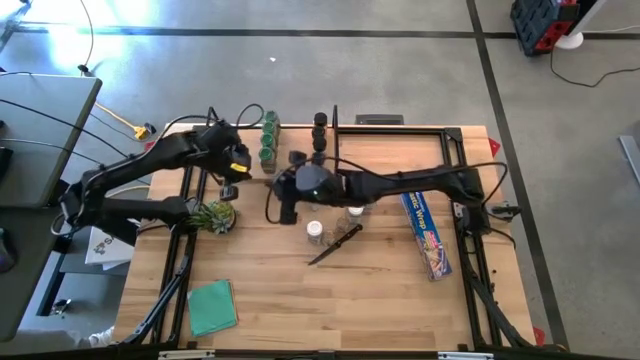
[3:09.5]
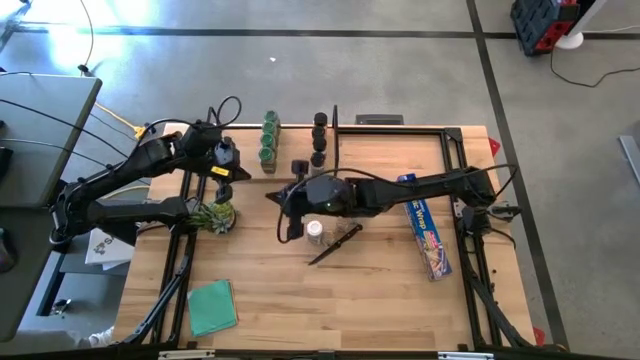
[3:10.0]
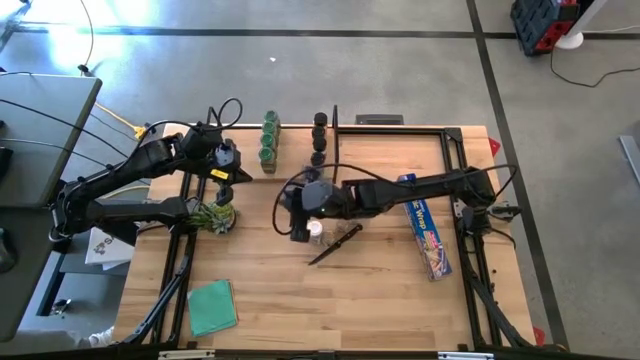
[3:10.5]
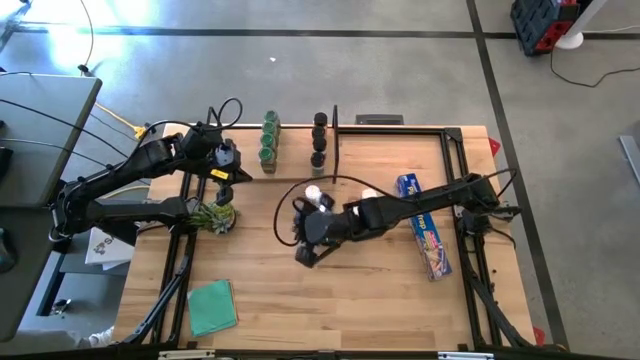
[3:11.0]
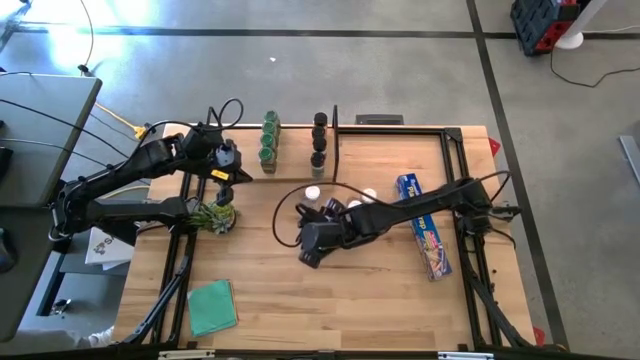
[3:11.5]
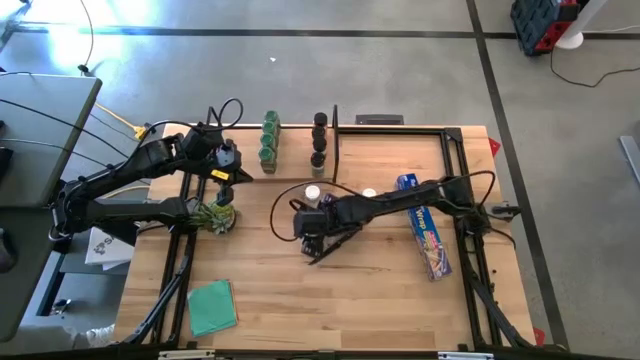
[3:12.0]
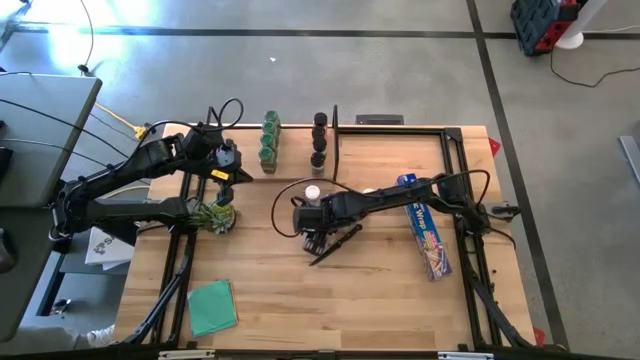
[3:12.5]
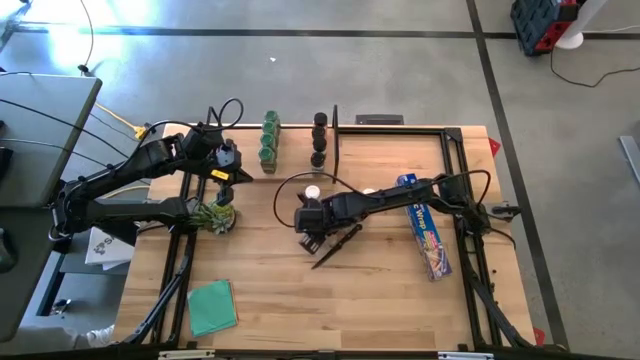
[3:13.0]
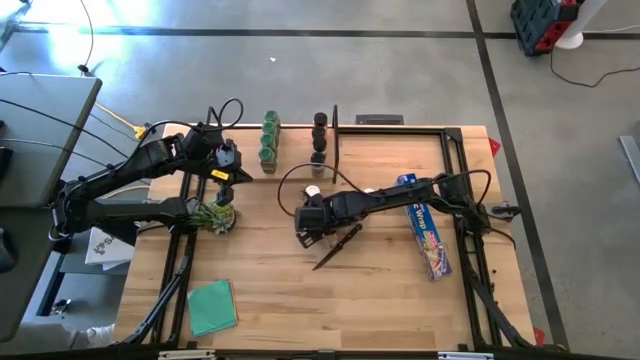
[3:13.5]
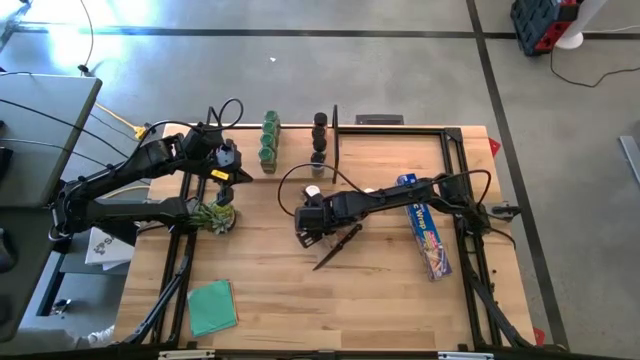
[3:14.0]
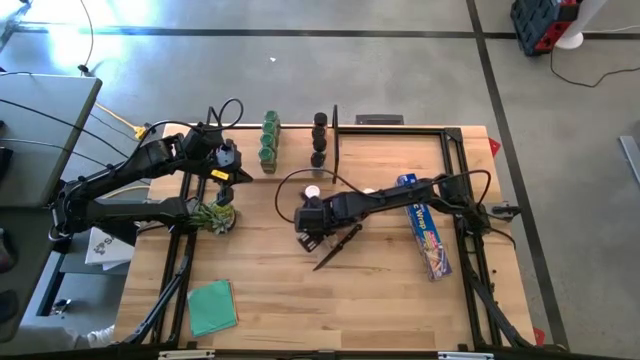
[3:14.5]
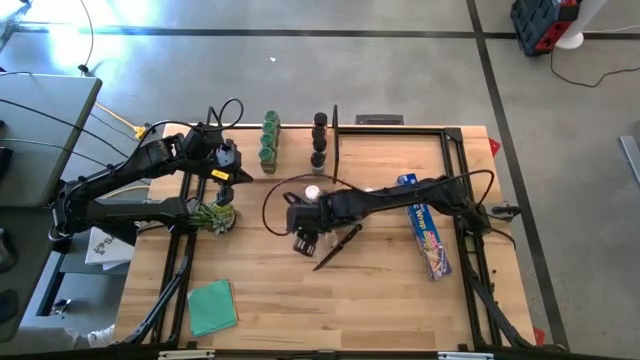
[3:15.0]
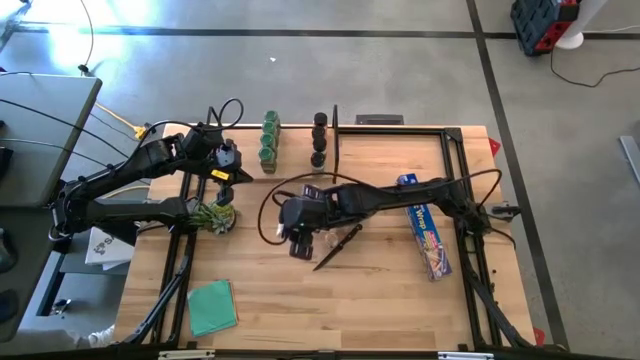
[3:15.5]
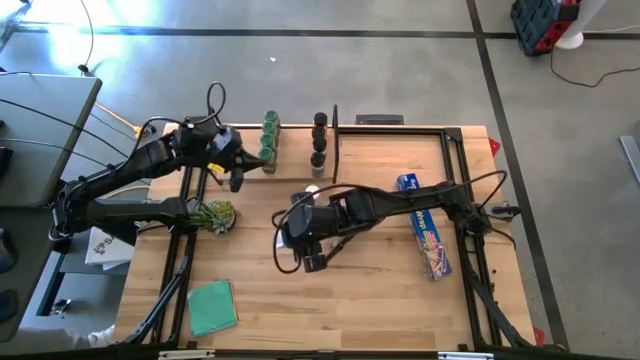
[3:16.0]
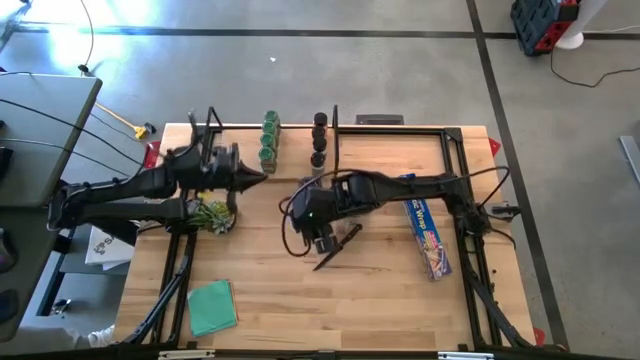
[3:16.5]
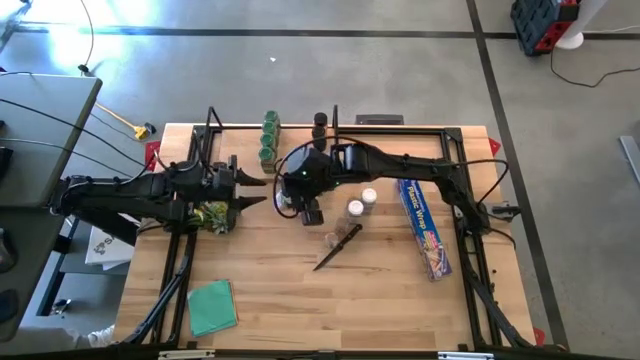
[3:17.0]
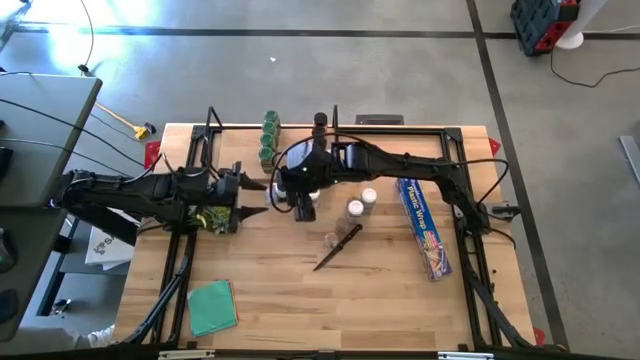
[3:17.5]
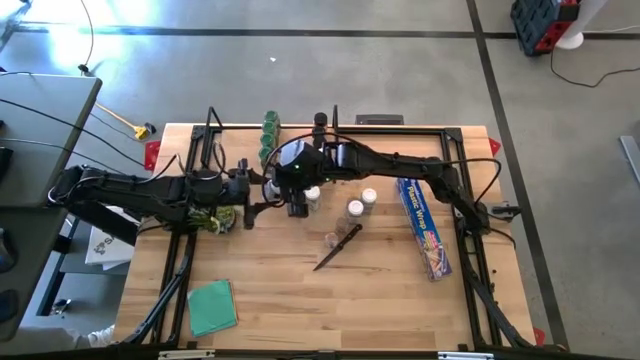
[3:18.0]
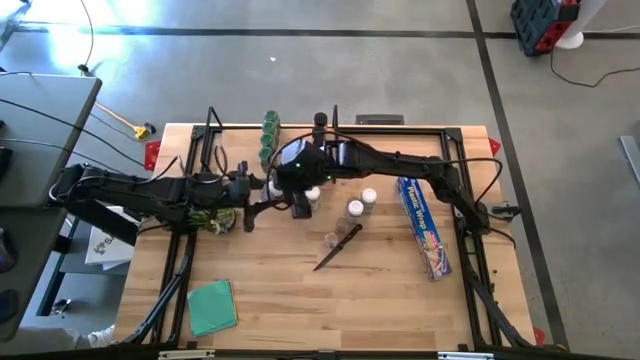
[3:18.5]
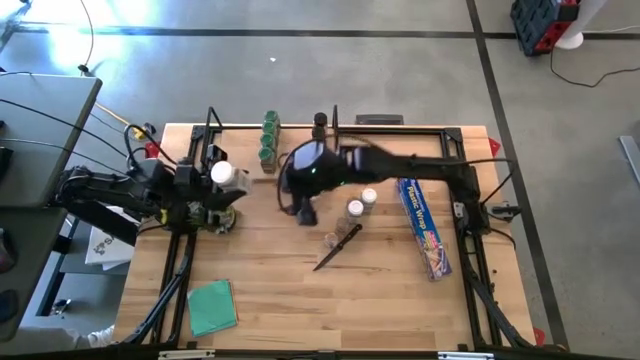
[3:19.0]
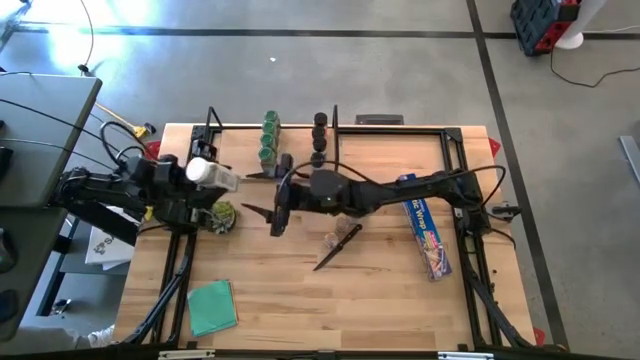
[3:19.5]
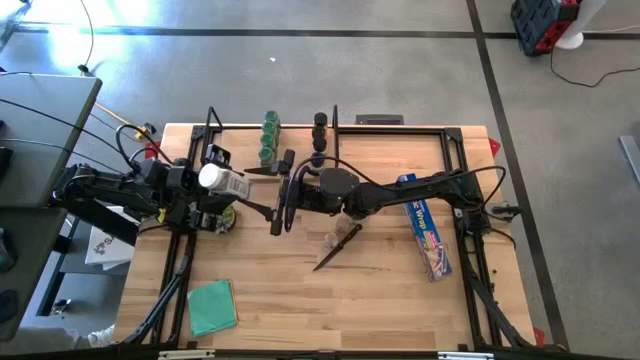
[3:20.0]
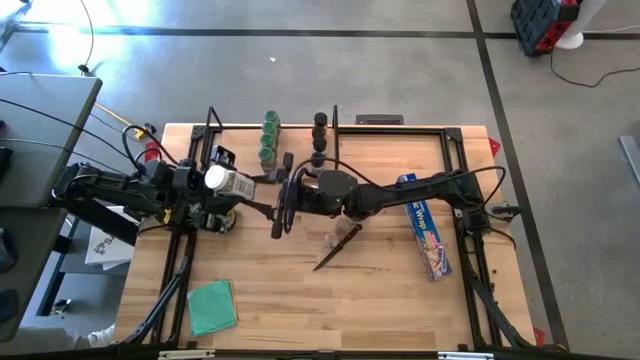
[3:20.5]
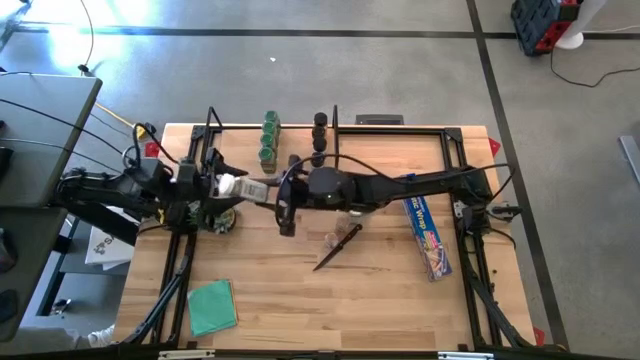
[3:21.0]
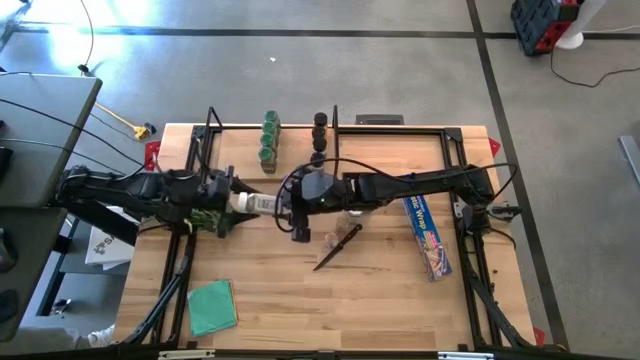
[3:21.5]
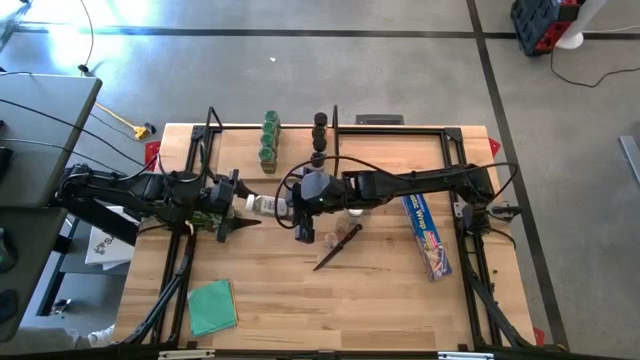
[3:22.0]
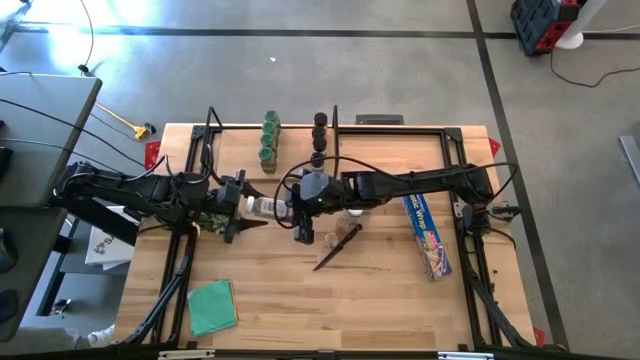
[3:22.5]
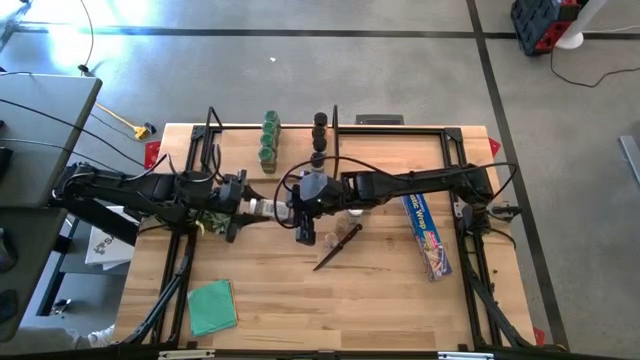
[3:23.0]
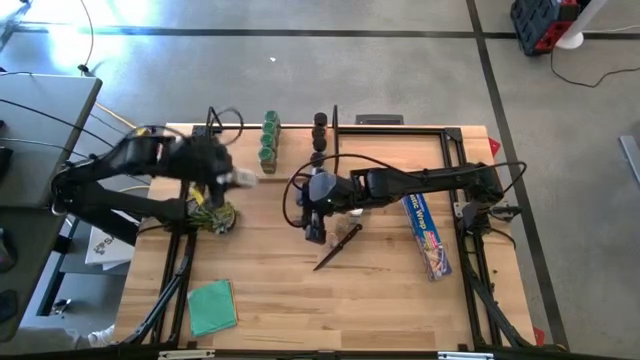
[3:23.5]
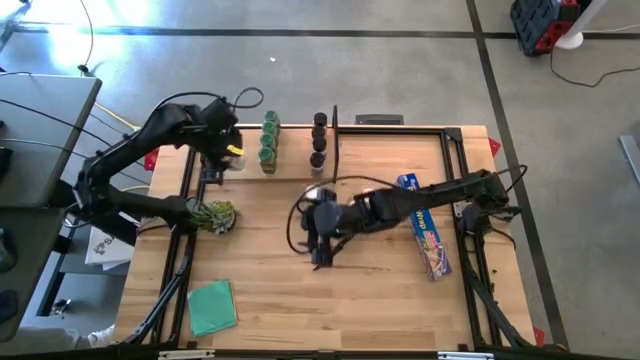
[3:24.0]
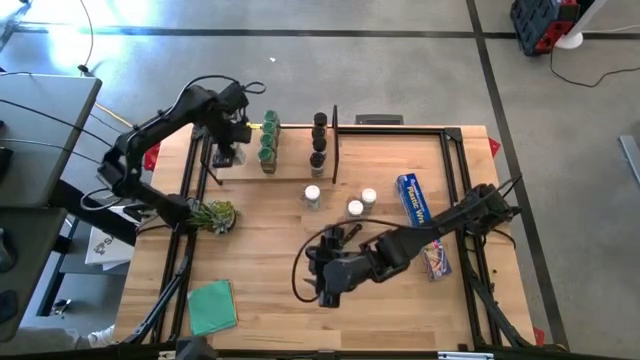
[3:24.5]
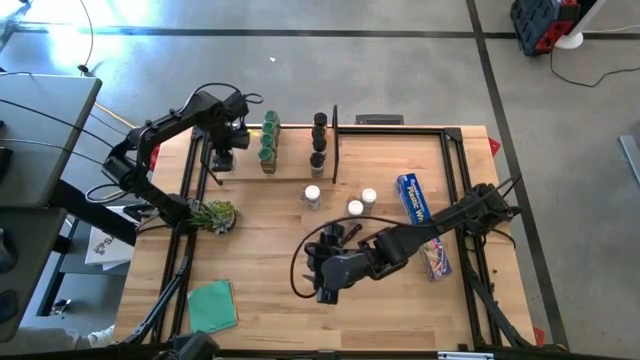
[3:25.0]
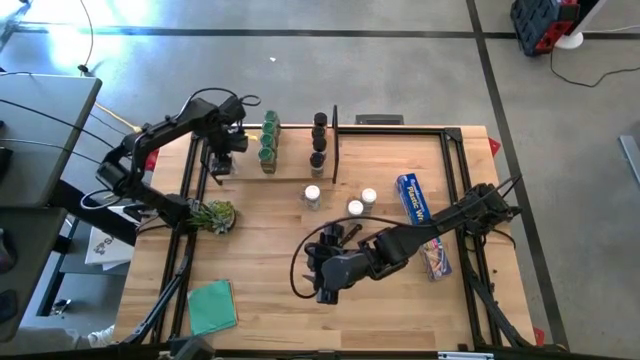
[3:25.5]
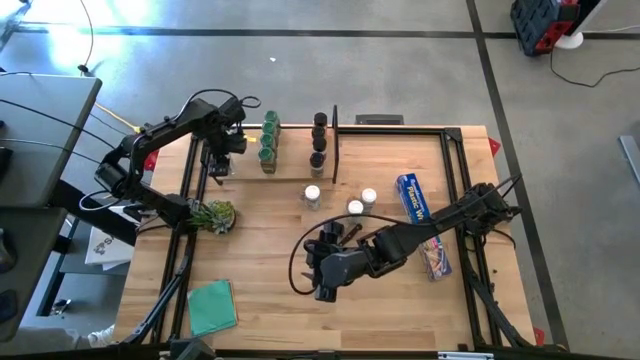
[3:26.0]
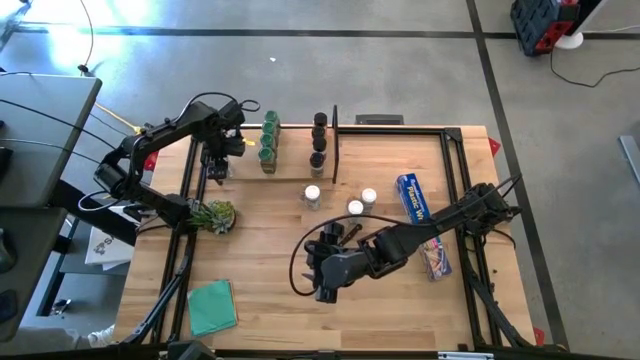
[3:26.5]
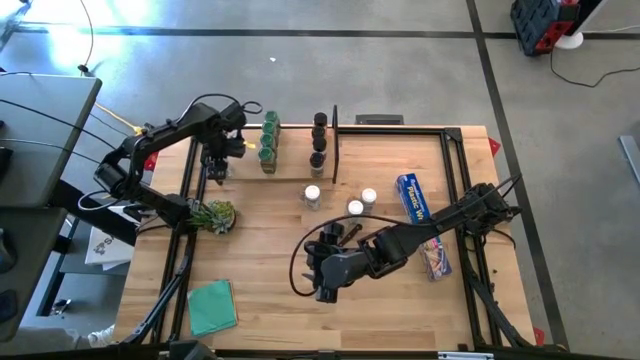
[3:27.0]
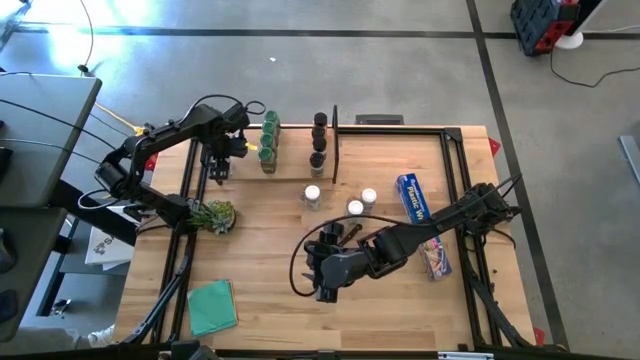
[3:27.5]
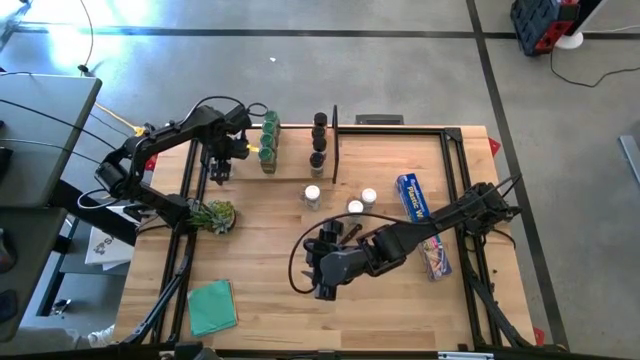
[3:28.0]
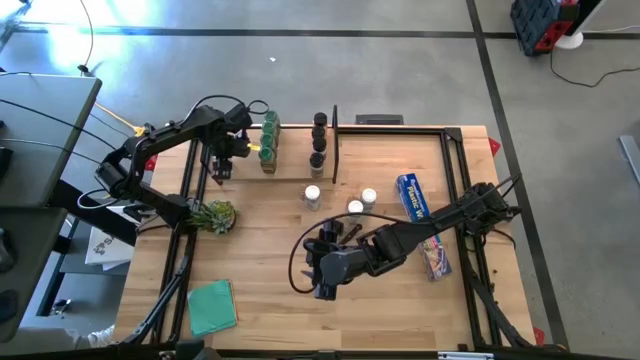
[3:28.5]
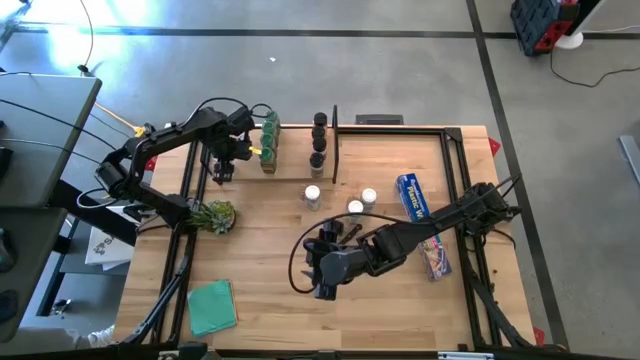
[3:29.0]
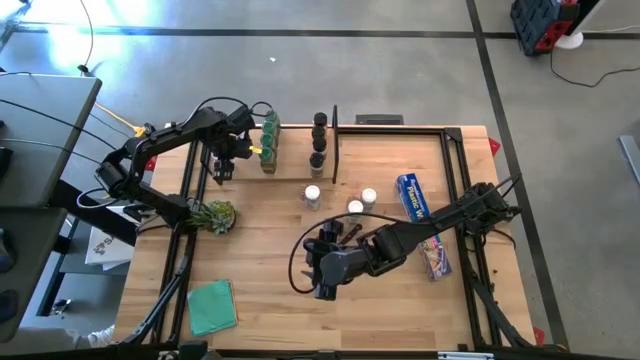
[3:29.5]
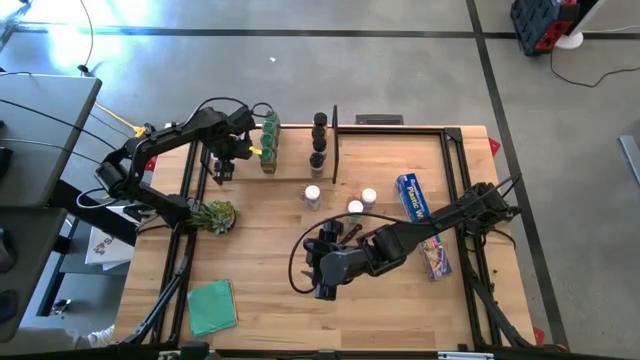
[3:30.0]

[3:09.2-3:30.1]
Task: Shelf spices
Put the white lid seasoning bottle on the shelf
